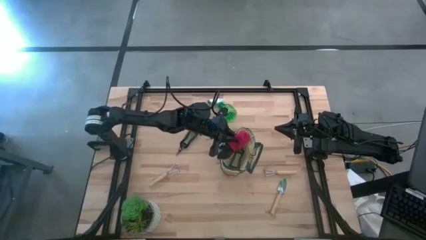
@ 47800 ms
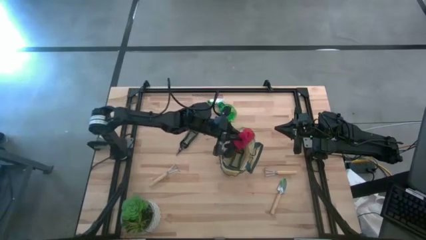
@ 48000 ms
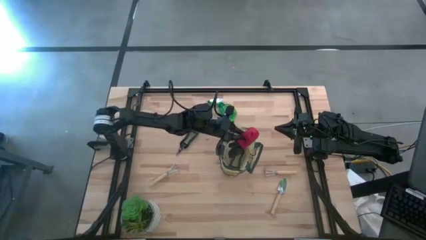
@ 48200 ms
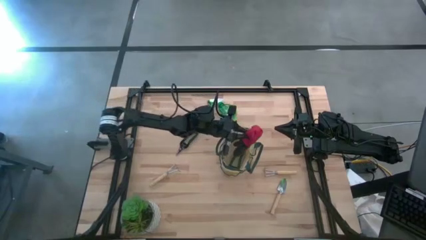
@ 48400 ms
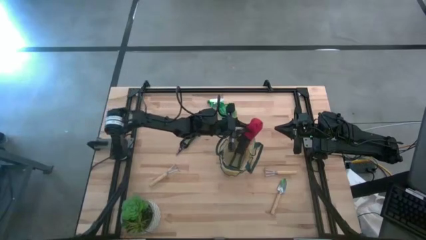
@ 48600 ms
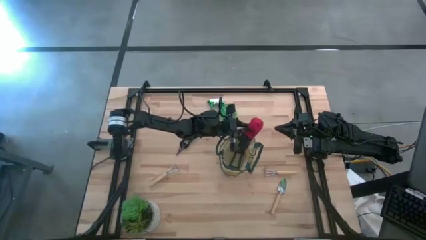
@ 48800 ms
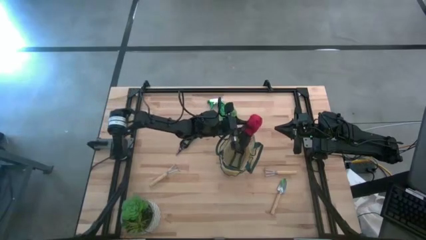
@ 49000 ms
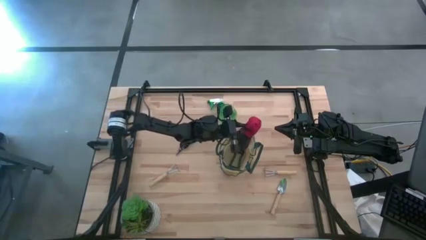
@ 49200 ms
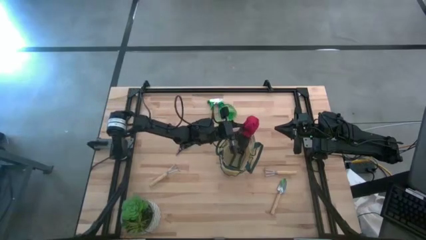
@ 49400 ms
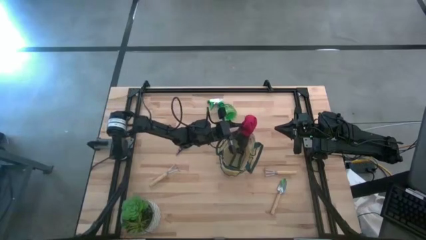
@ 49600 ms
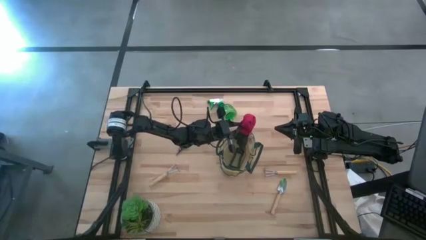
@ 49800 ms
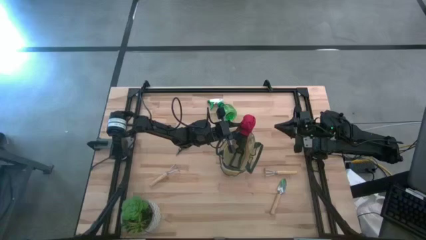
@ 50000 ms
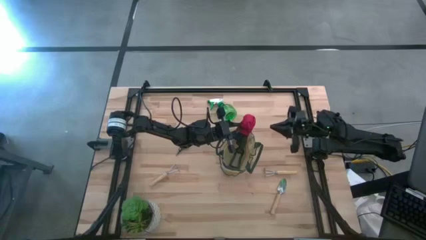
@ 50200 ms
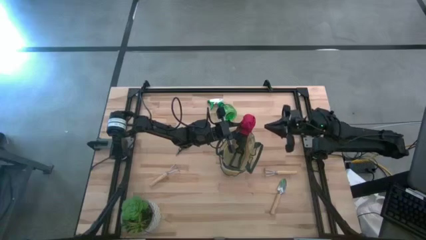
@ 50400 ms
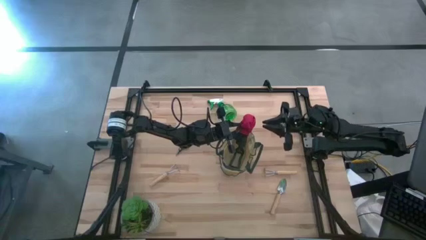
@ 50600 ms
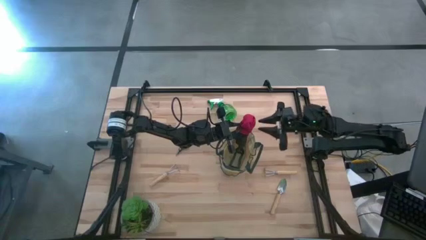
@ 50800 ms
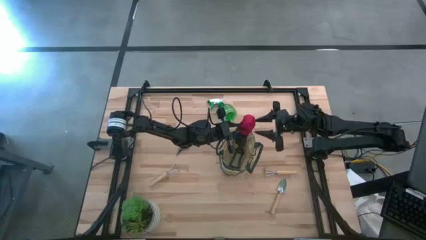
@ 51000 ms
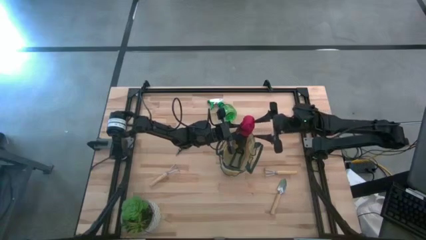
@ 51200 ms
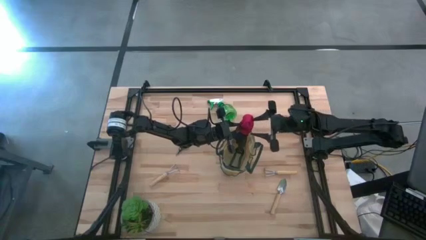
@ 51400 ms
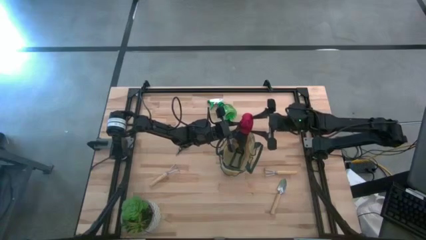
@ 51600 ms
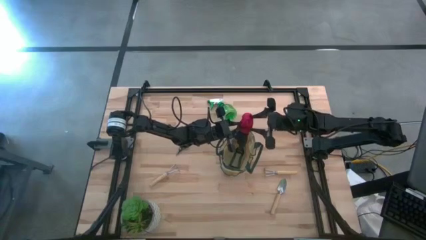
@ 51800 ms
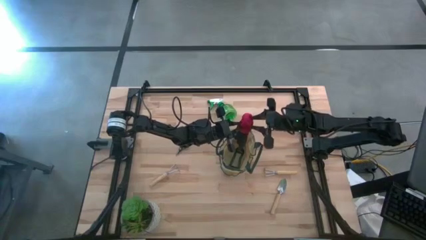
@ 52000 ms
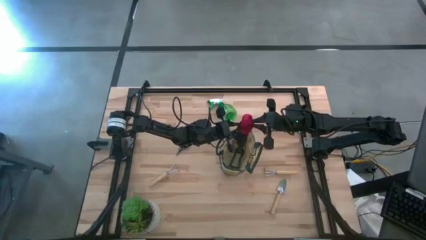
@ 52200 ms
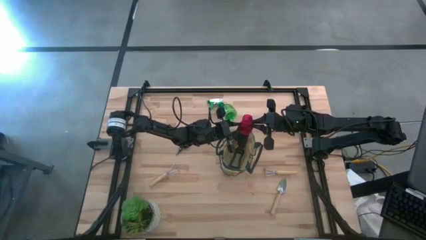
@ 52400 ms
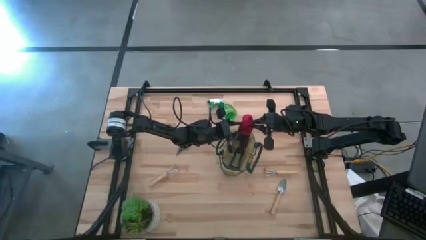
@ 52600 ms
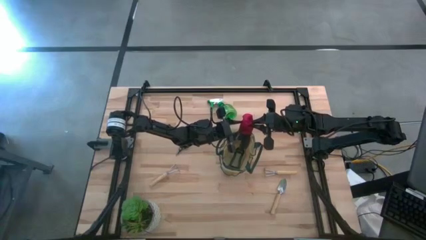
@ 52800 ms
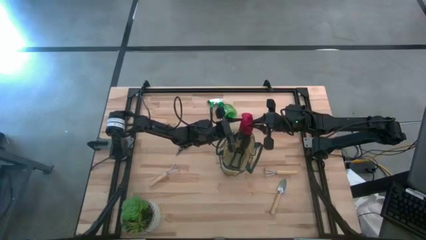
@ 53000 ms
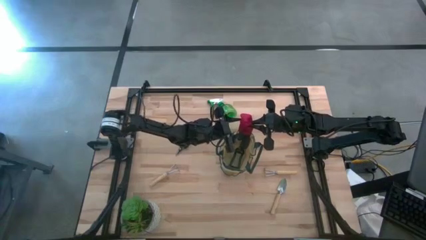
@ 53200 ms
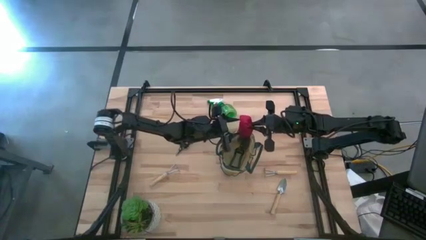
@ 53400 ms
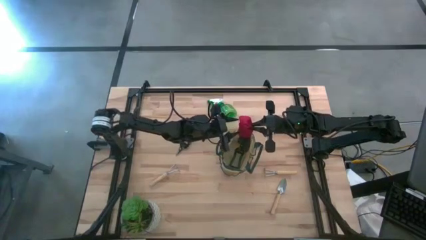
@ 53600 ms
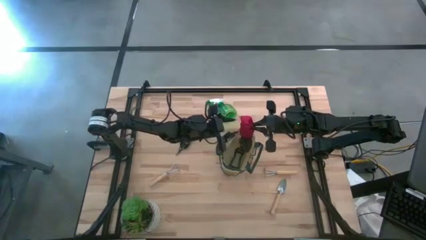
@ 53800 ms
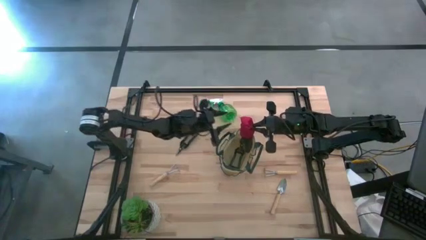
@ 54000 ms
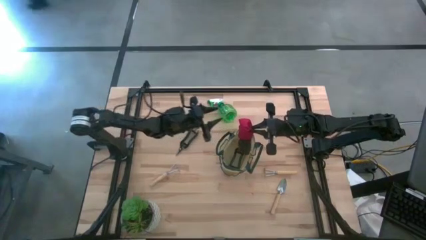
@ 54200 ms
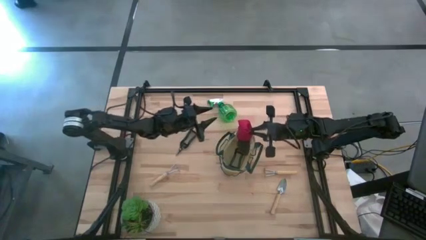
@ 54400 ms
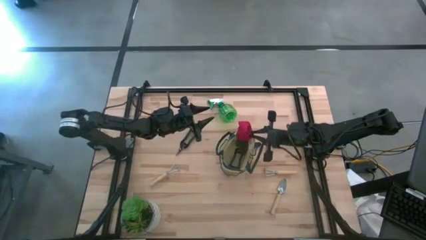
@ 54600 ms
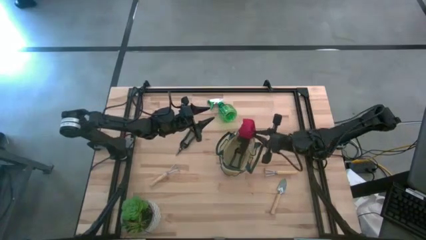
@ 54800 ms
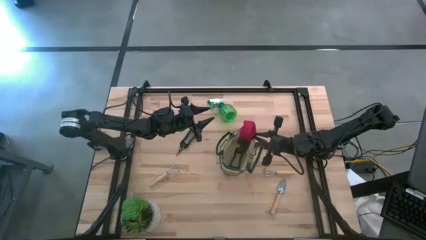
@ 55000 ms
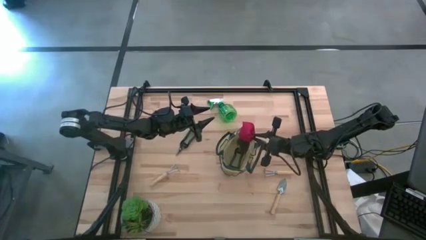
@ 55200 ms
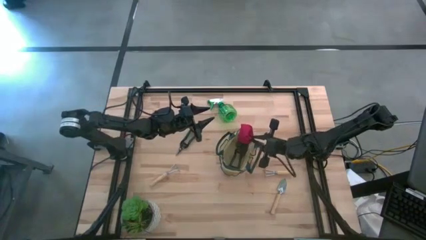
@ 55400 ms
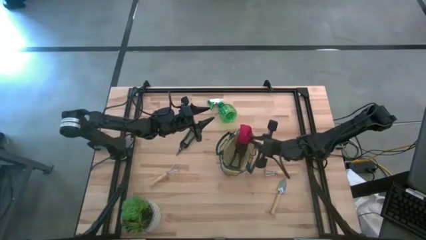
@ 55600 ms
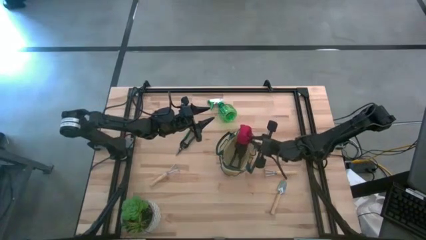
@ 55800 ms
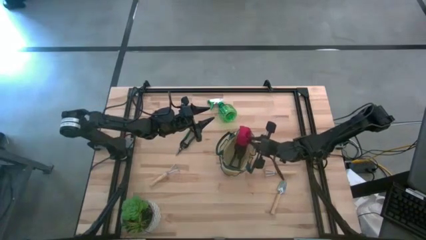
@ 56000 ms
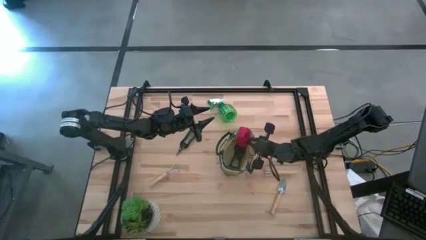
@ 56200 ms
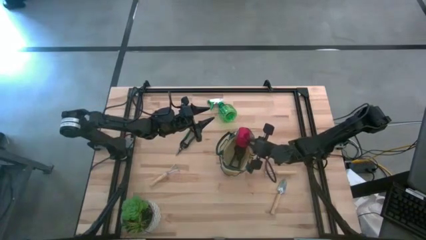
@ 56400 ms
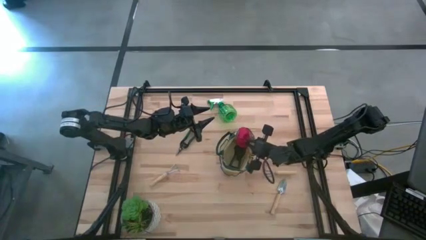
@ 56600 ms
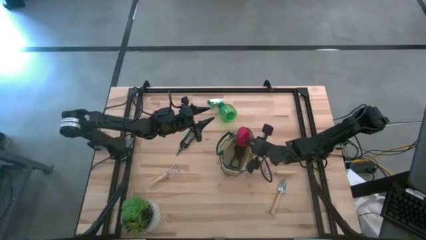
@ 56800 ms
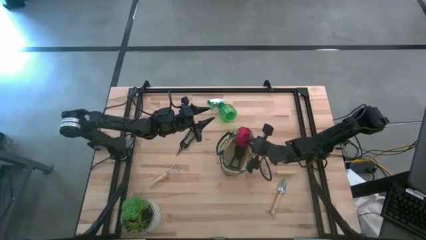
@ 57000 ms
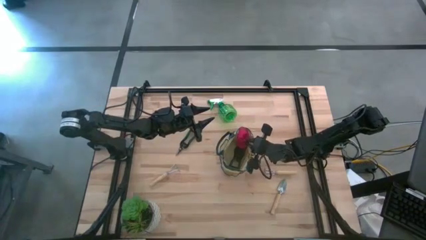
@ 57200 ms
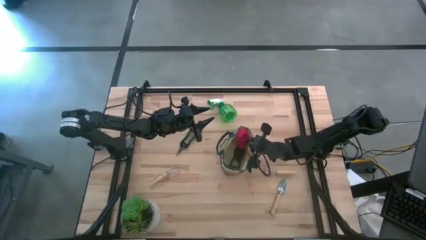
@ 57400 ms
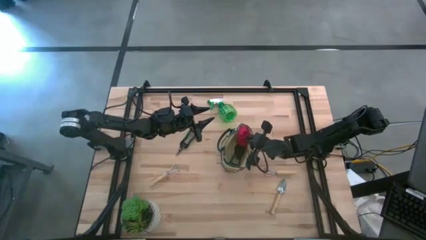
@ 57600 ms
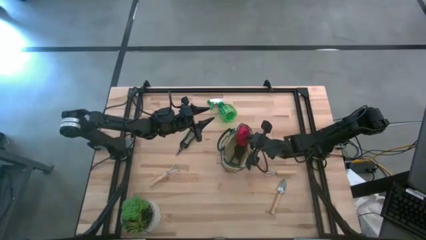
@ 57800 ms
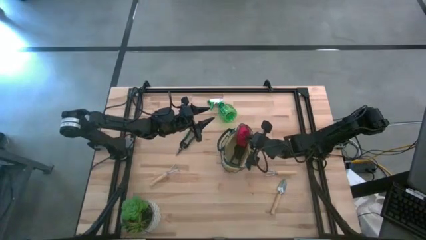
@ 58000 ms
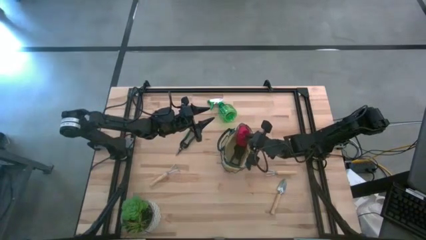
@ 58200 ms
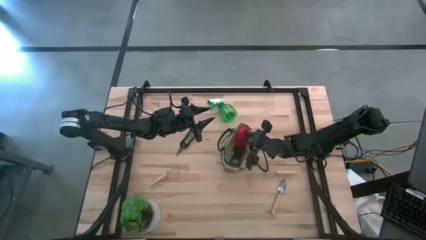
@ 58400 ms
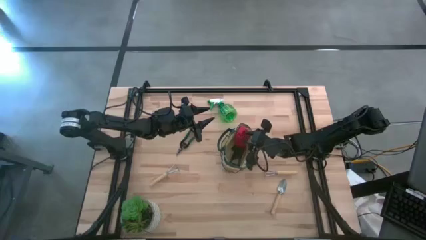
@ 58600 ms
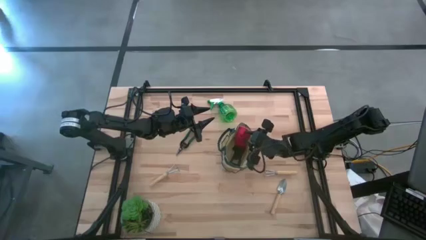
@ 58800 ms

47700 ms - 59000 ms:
Task: Pick & Place Garden tools in Gardening bag
Put the gloves into the gardening bag

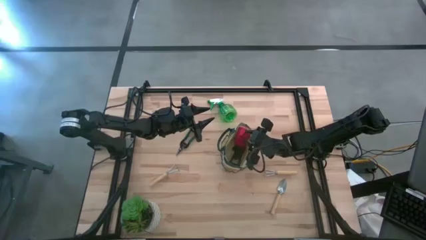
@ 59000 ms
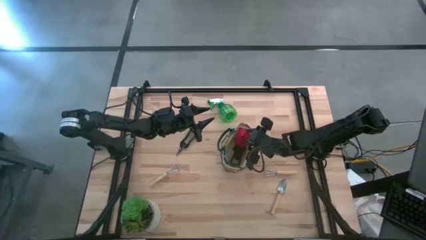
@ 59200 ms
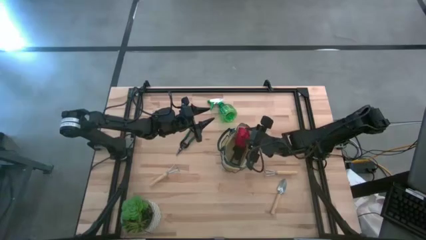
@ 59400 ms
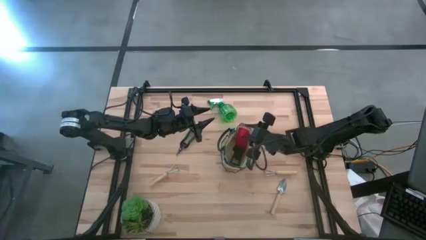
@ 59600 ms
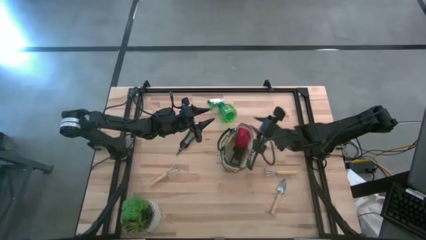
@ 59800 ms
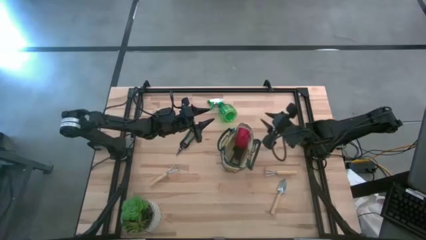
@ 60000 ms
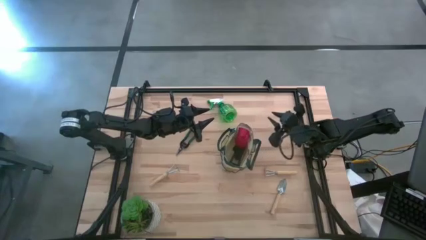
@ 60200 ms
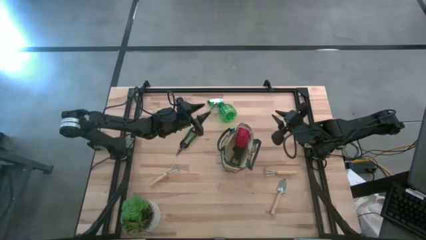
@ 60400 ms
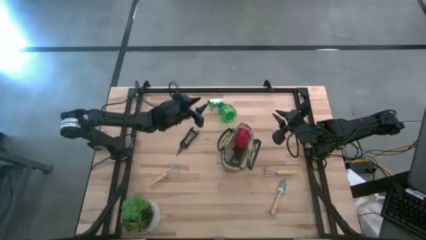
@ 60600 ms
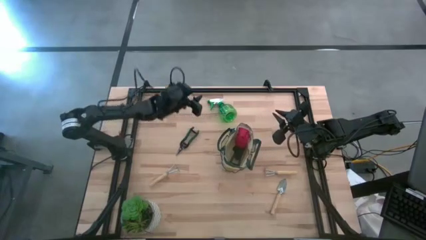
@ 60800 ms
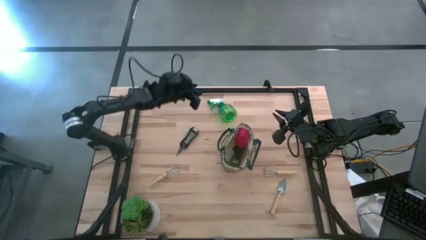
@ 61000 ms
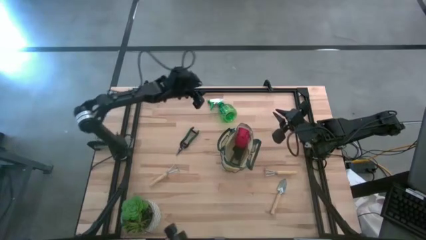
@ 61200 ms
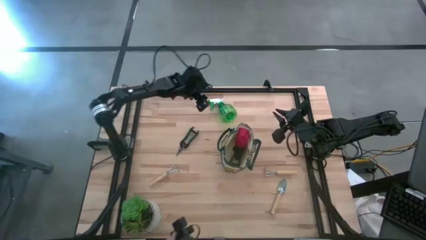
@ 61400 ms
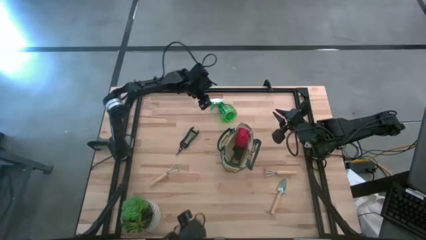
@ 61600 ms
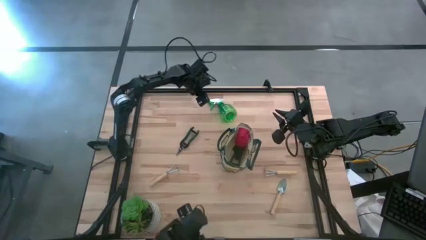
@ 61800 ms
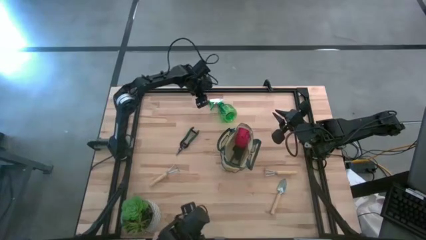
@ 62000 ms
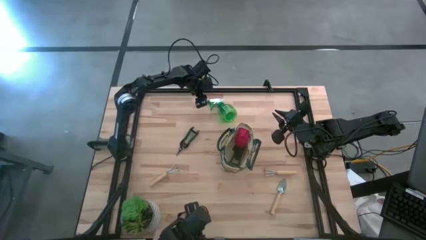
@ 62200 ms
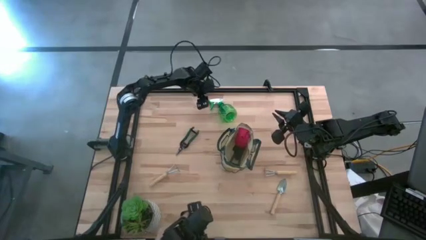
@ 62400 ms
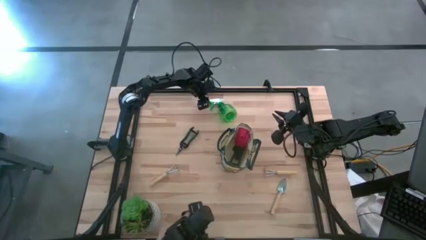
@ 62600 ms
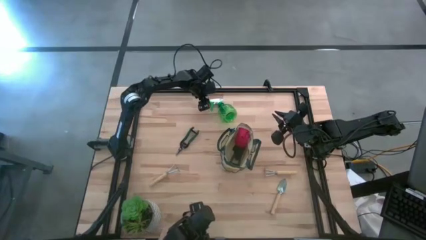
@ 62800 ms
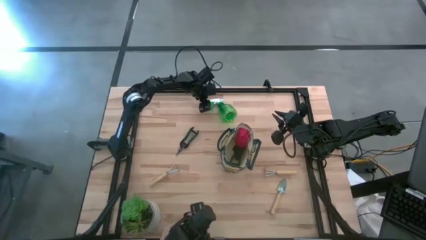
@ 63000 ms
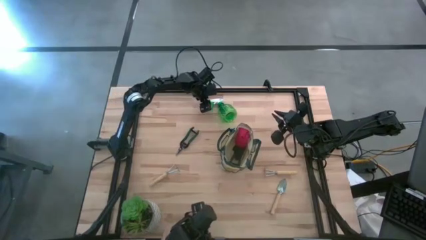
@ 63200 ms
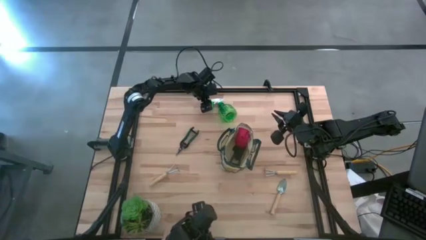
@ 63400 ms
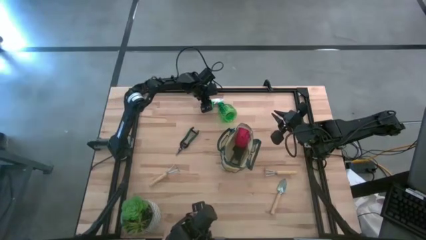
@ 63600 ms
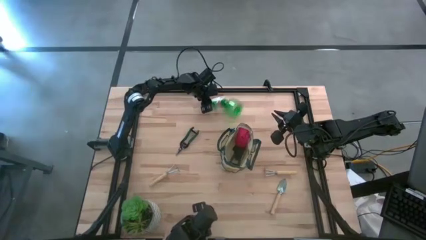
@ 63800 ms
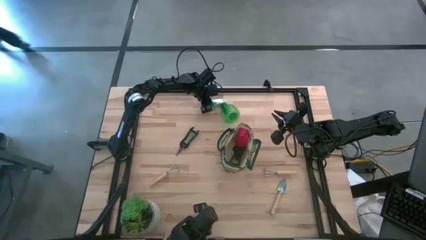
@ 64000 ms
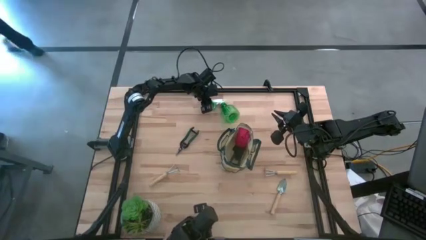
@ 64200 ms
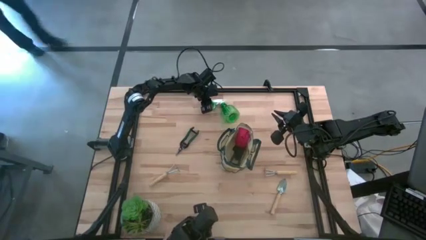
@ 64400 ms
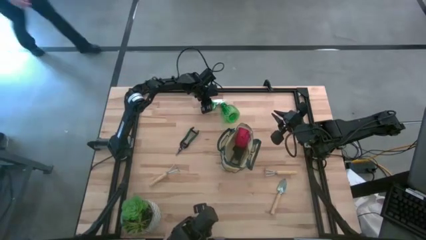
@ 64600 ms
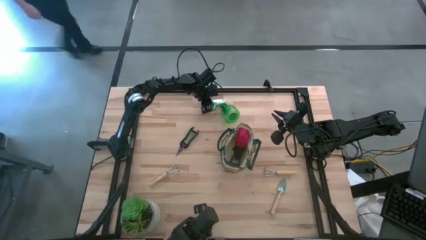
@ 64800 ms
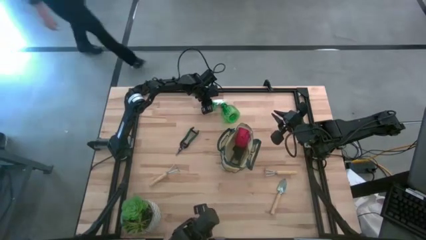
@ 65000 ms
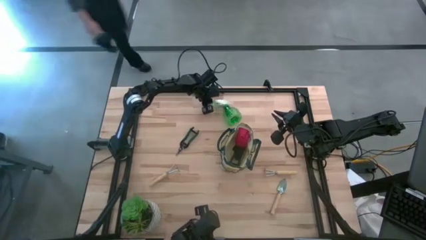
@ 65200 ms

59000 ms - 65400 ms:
Put the spray bottle into the gardening bag
